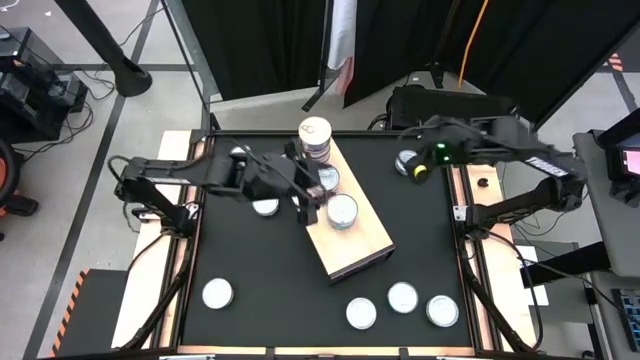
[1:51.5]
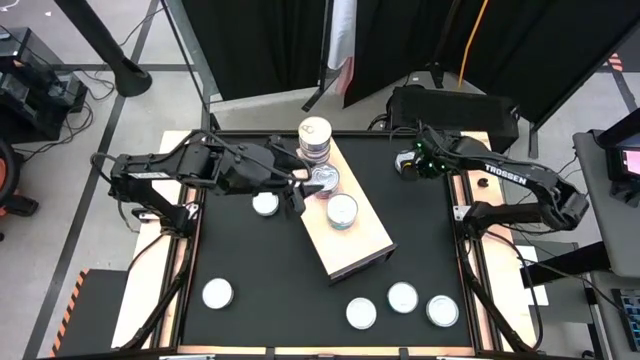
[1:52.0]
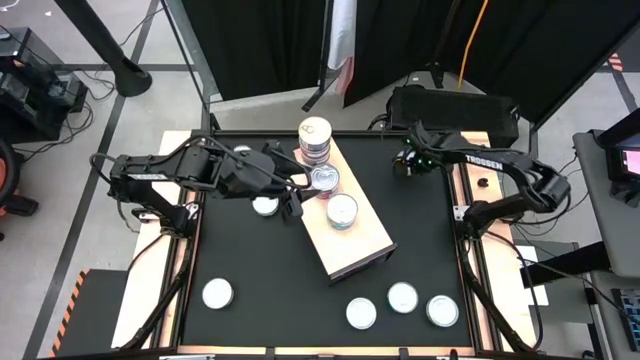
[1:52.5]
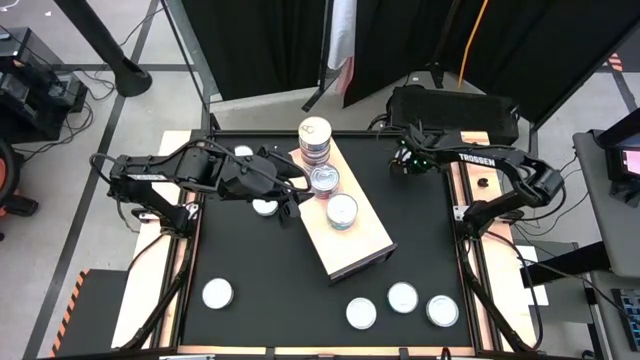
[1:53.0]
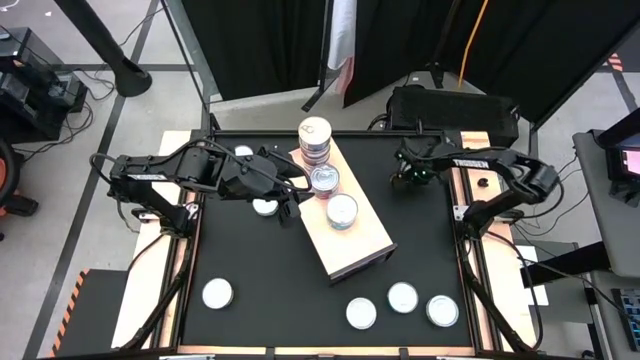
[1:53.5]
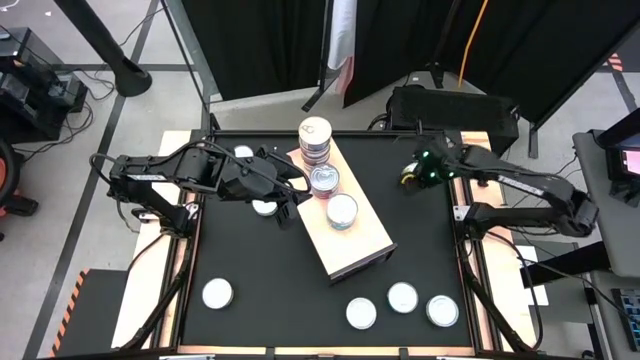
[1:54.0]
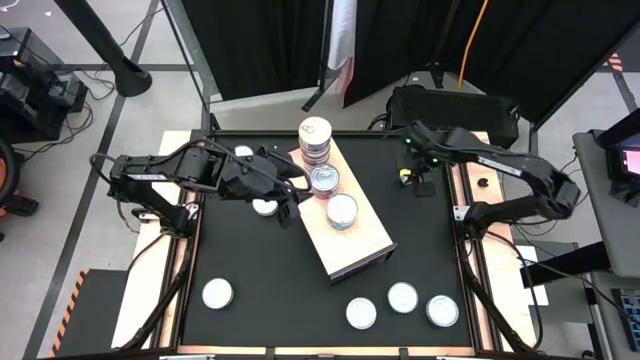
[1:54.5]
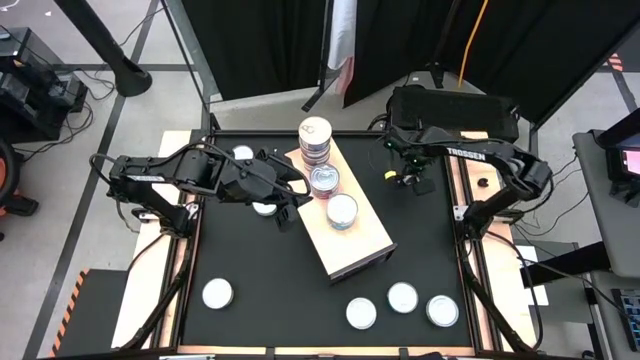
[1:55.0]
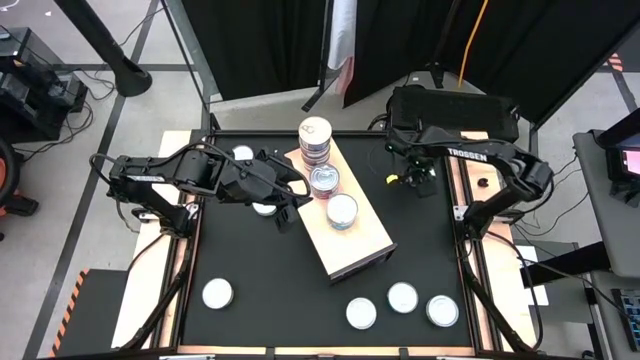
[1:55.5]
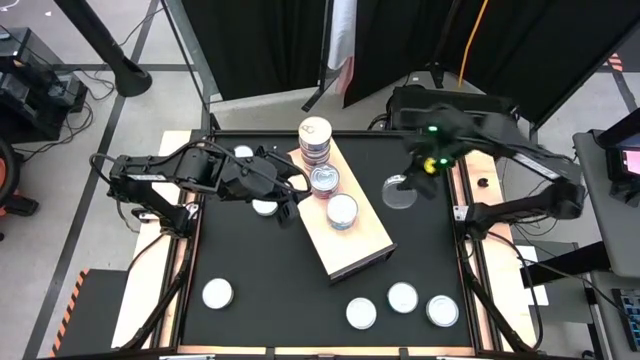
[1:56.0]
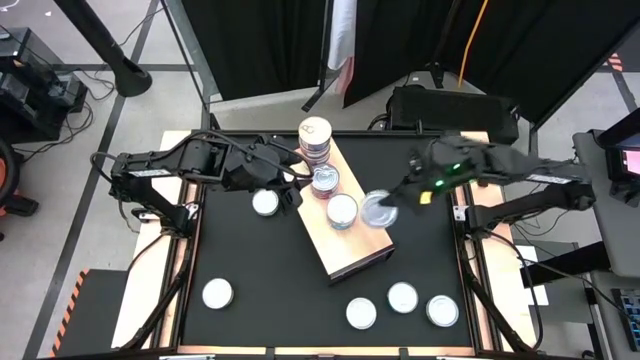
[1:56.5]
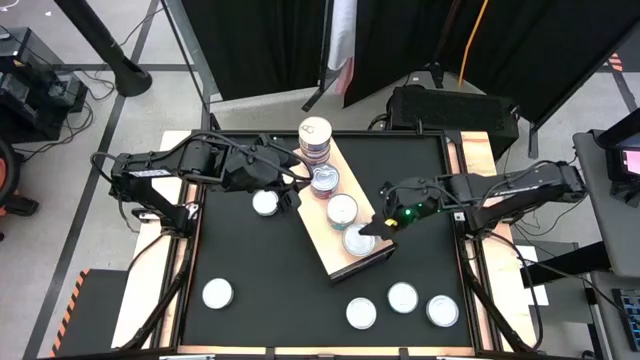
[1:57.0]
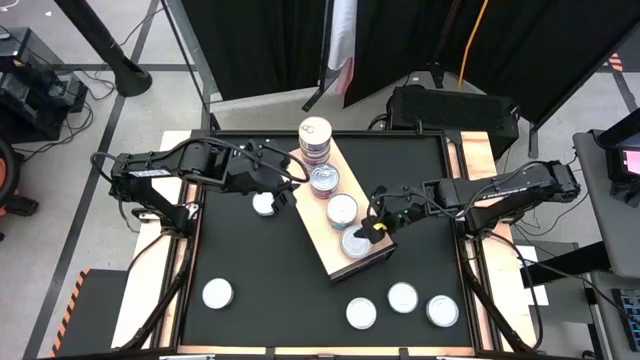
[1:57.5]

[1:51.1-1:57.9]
Task: Stack canned seafood by type on shelf
Put the green tuna can on the shelf

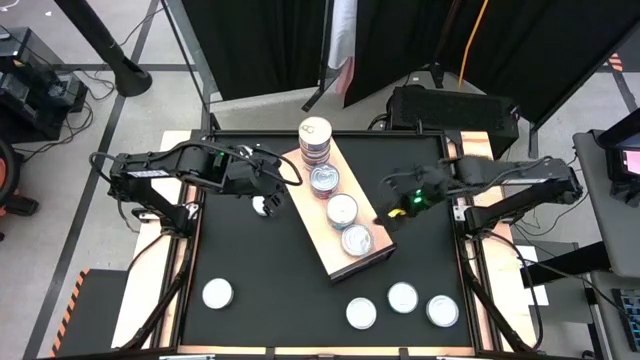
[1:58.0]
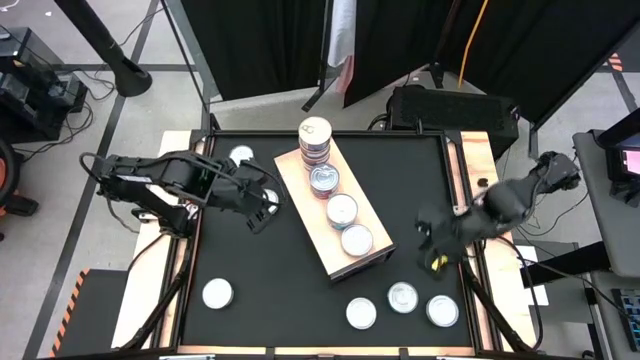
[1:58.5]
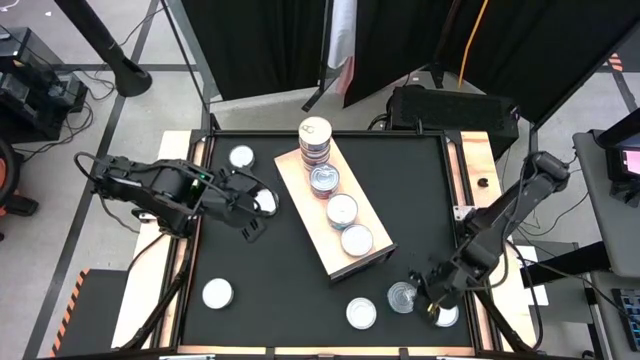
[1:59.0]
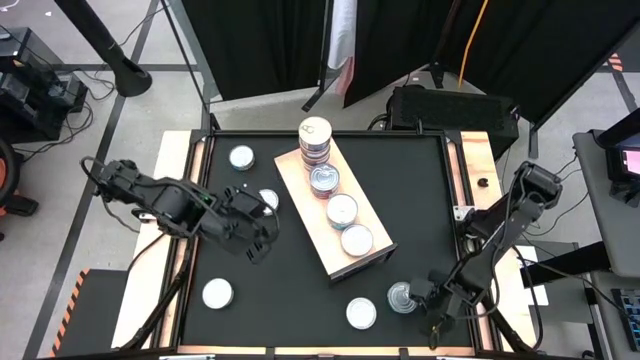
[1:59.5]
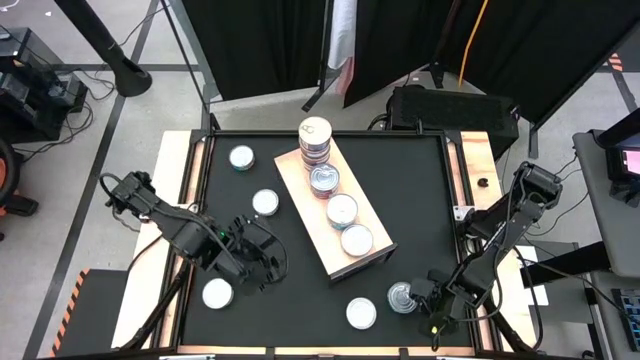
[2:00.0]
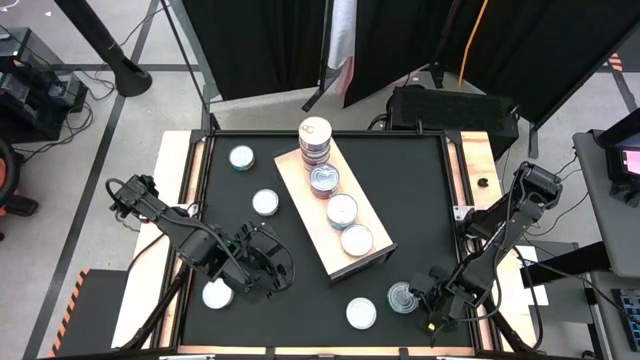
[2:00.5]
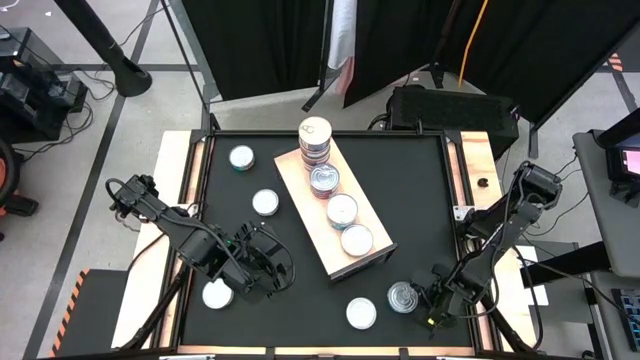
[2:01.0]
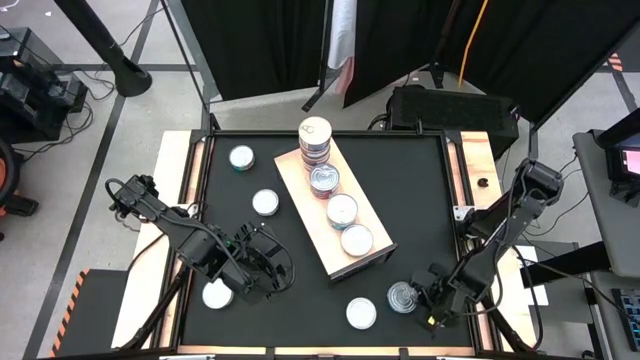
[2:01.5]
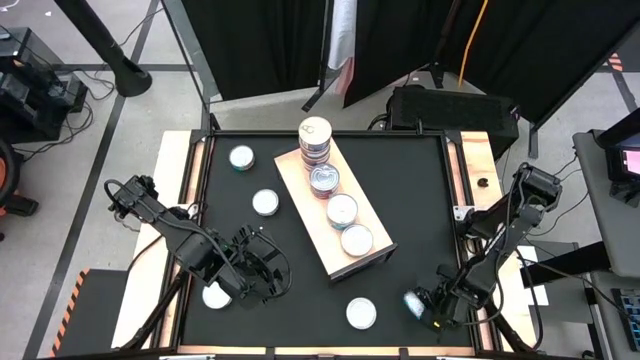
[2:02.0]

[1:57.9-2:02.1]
Stack the yellow-blue tuna can on top of the stacked yellow-blue tuna can on the shelf

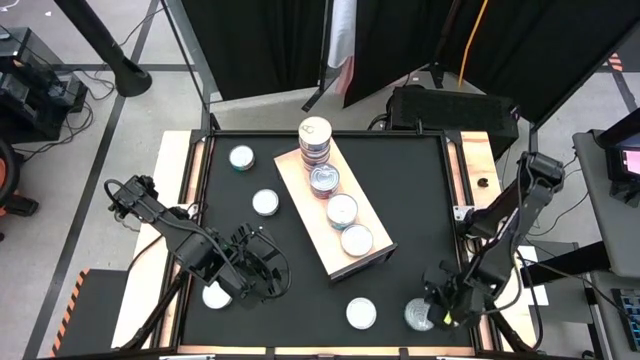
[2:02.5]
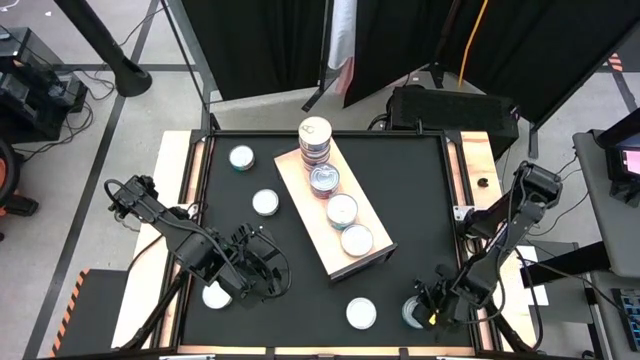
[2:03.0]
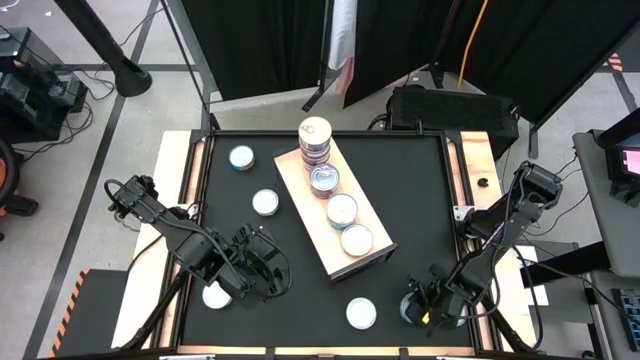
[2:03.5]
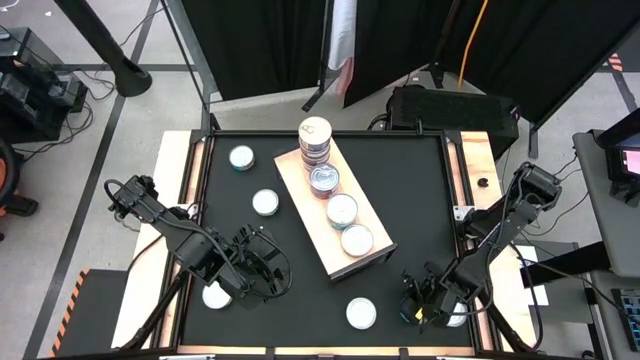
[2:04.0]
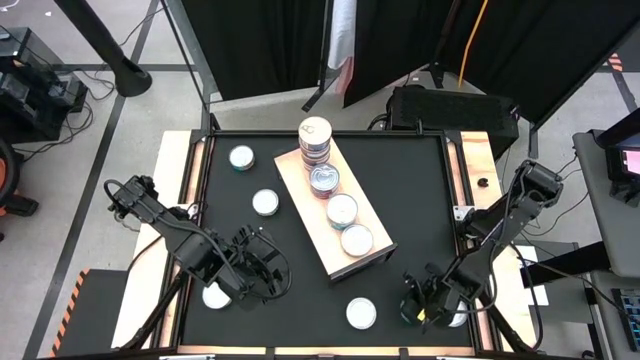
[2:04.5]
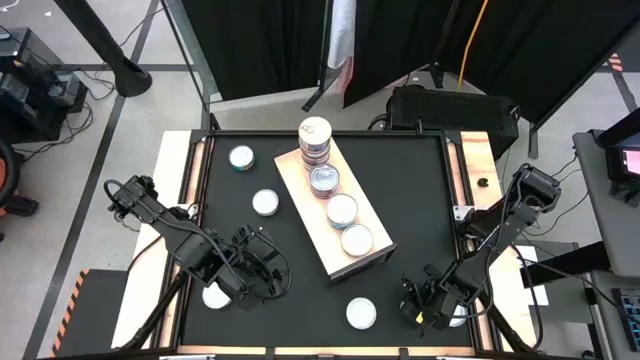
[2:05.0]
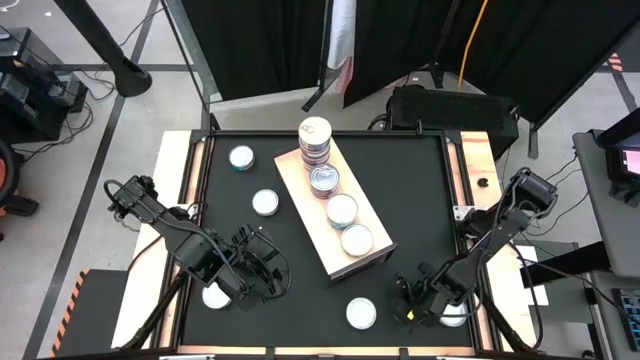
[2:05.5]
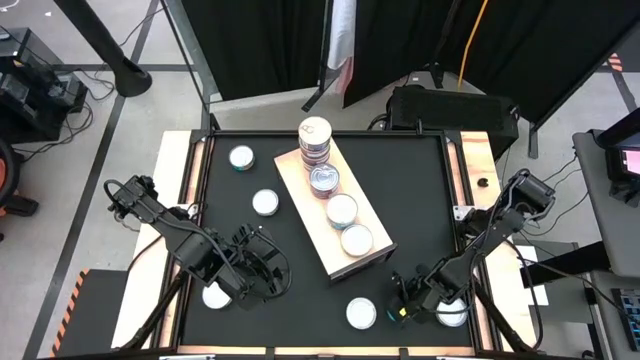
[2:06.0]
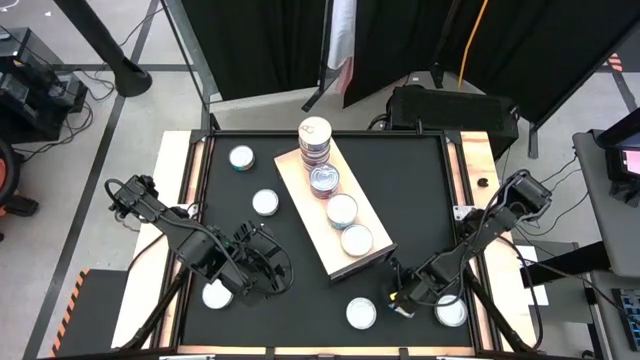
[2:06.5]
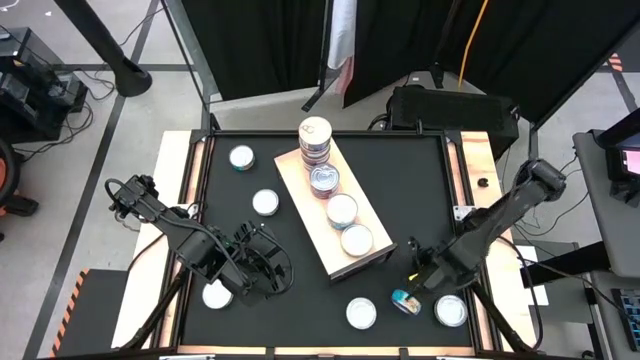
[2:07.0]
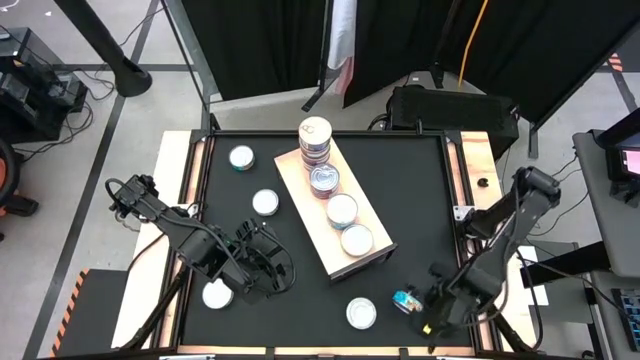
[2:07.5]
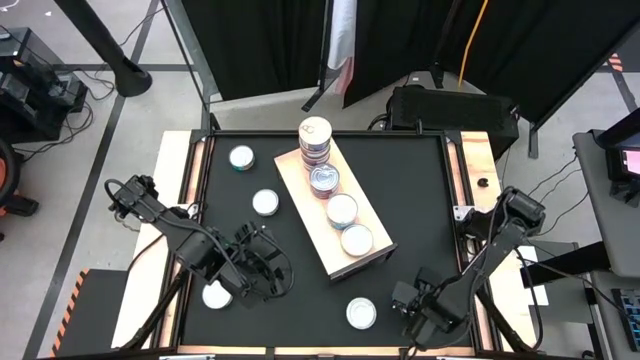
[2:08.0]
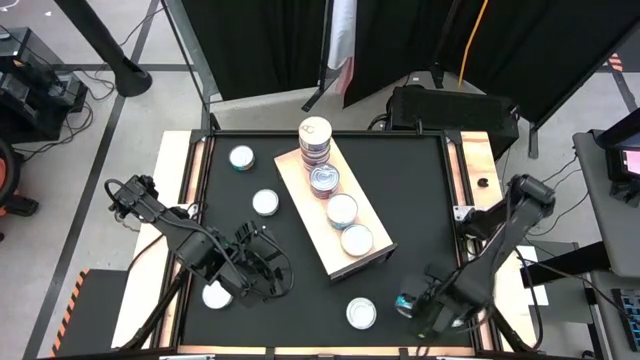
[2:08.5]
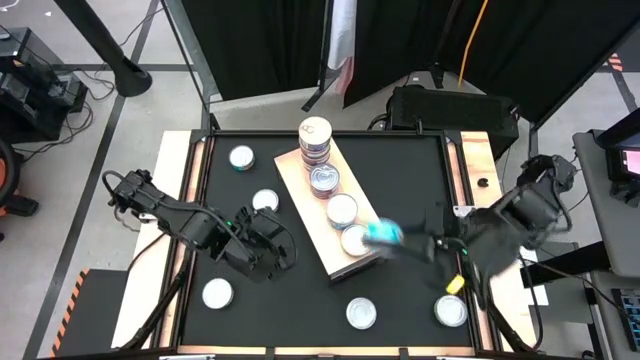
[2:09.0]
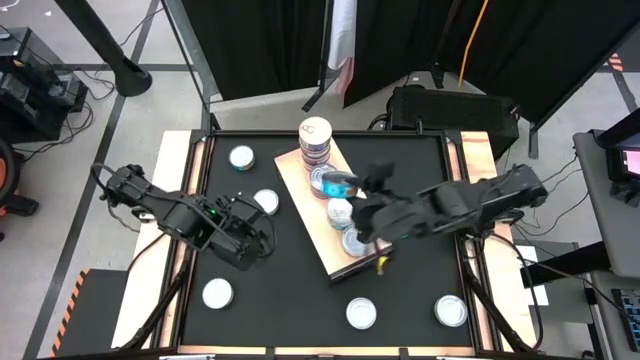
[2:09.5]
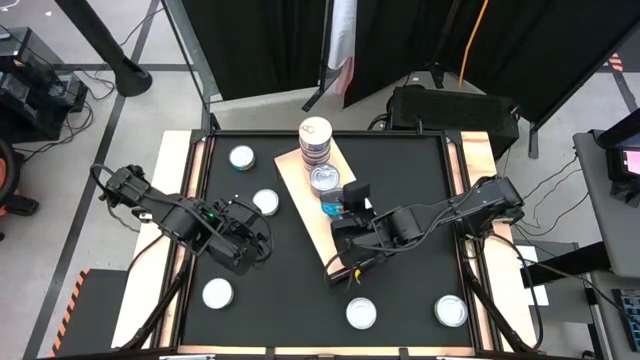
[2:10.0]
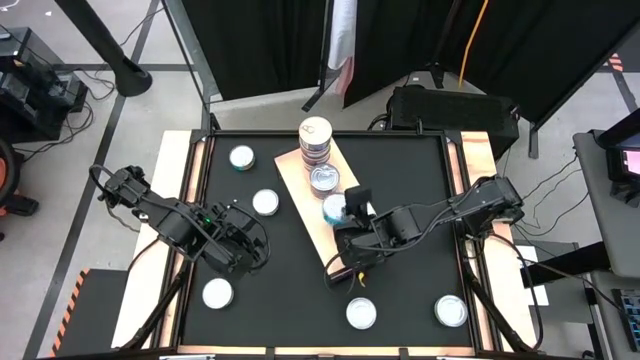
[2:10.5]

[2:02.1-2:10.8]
Stack the yellow-blue tuna can on top of the stacked yellow-blue tuna can on the shelf

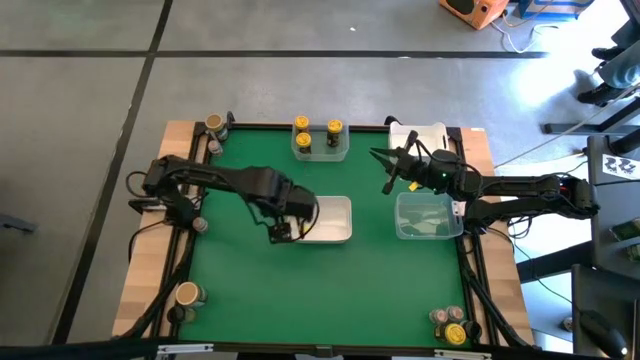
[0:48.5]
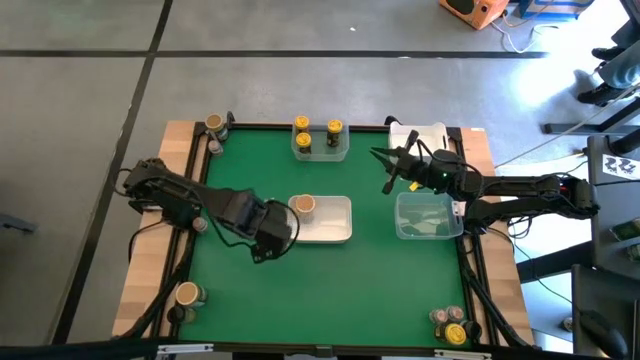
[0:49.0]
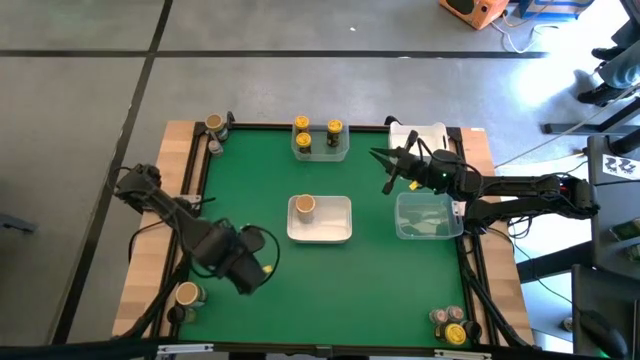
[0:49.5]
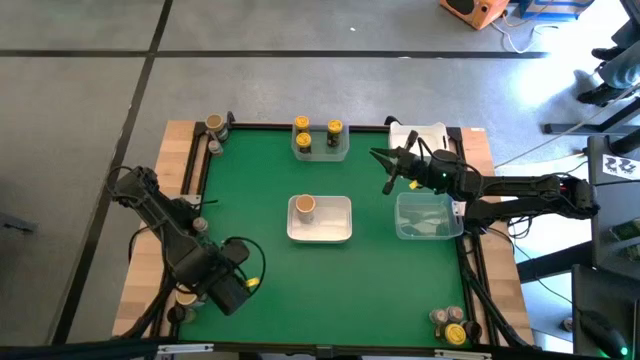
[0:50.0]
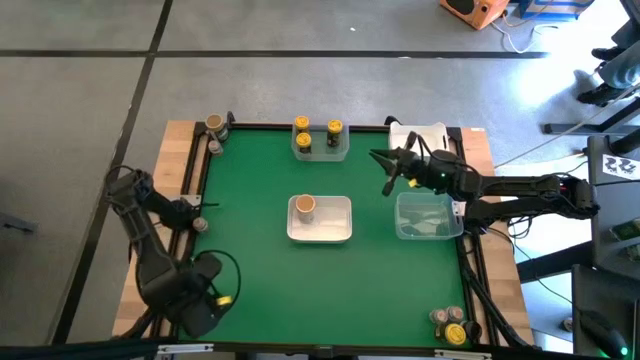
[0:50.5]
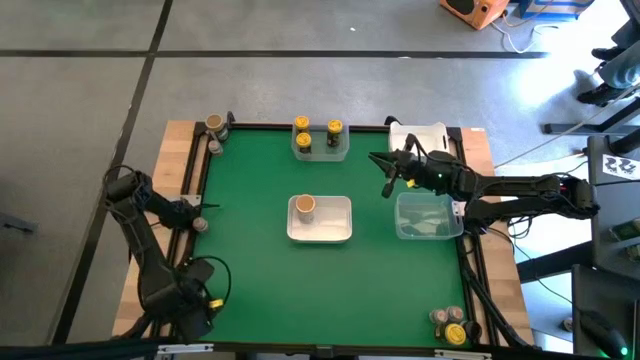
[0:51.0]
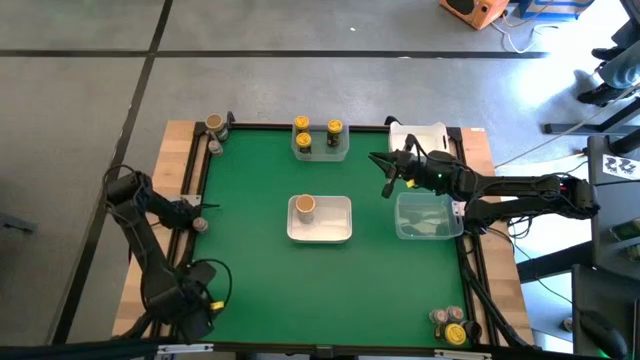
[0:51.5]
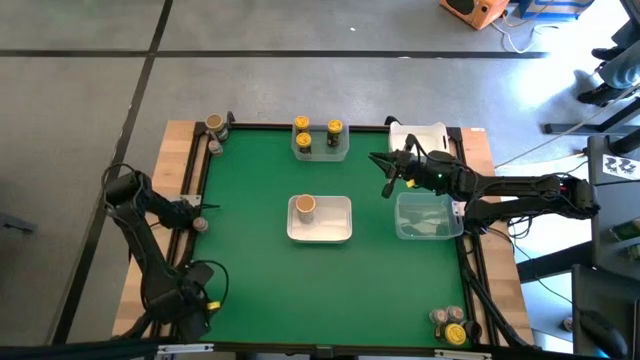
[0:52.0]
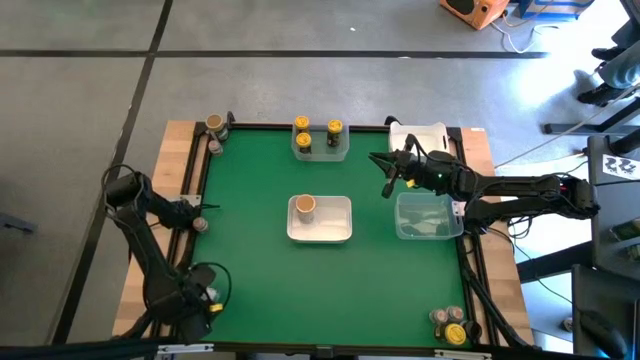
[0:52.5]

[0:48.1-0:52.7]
Task: Sort spices by type
Put the bottom gold seasoning bottle into the bottom white bin
